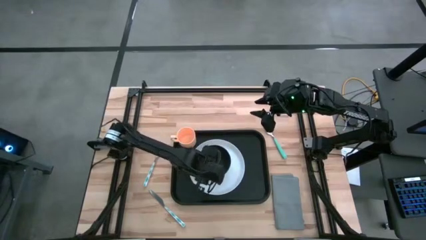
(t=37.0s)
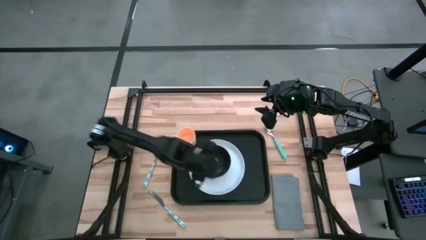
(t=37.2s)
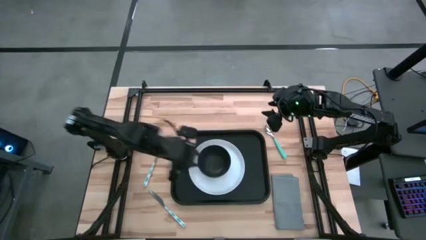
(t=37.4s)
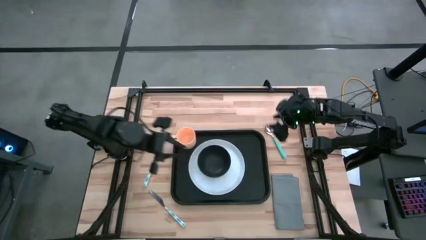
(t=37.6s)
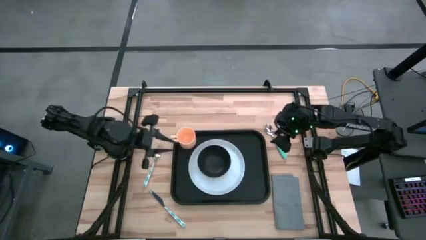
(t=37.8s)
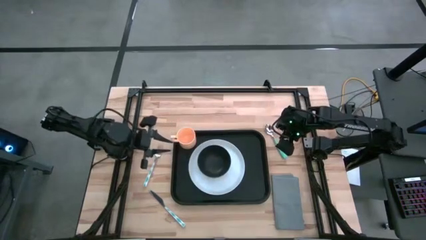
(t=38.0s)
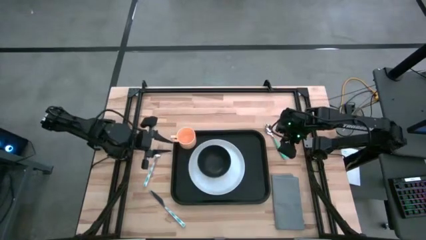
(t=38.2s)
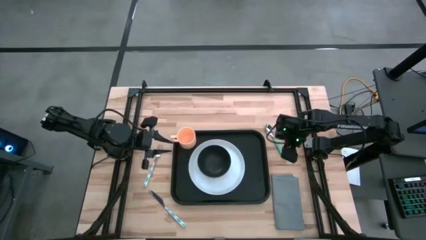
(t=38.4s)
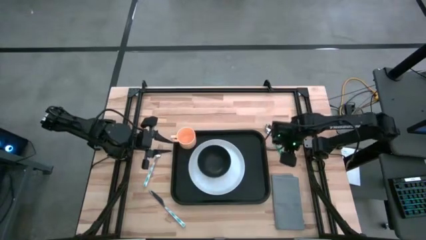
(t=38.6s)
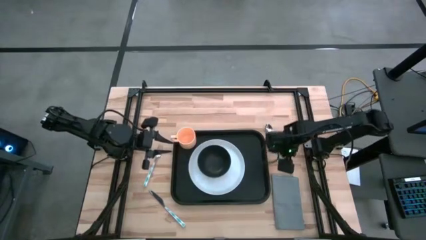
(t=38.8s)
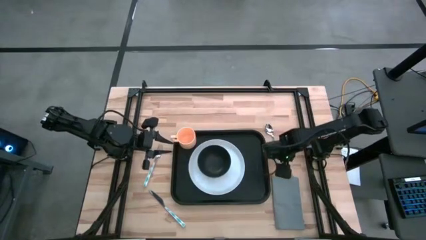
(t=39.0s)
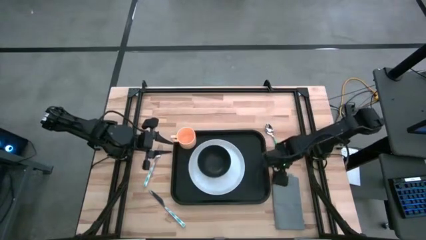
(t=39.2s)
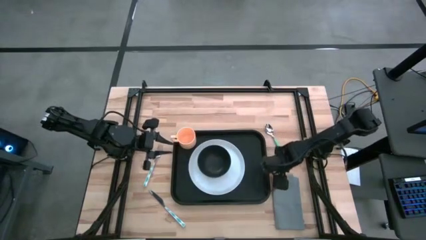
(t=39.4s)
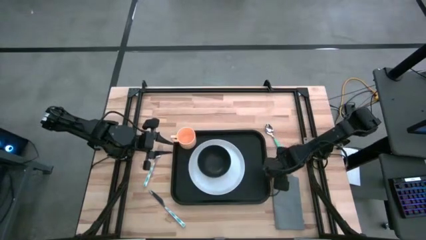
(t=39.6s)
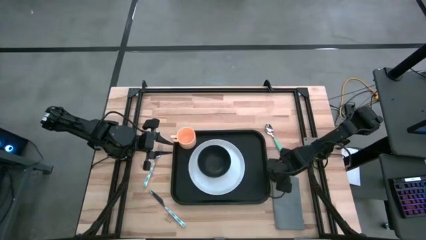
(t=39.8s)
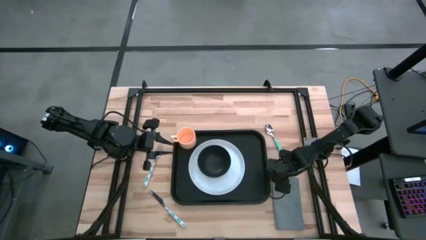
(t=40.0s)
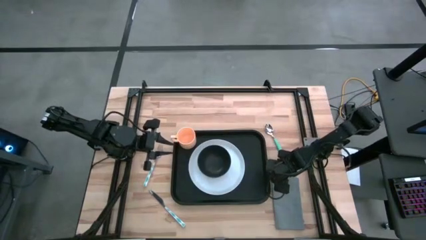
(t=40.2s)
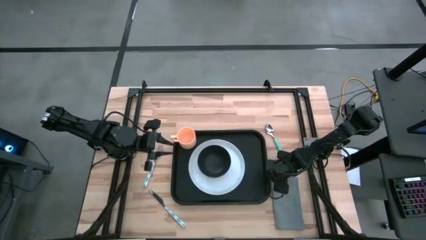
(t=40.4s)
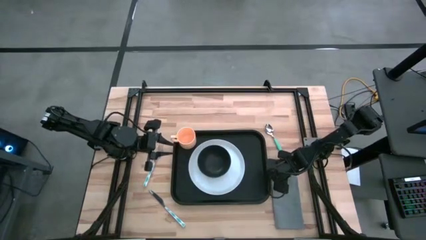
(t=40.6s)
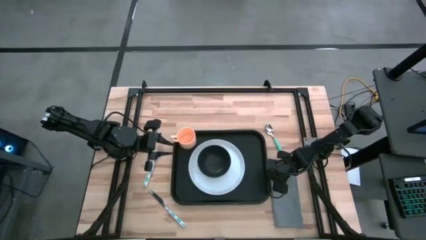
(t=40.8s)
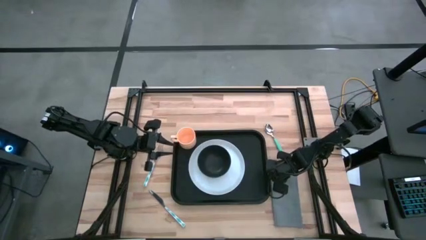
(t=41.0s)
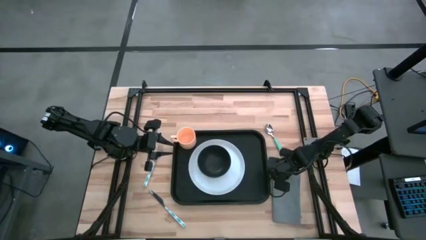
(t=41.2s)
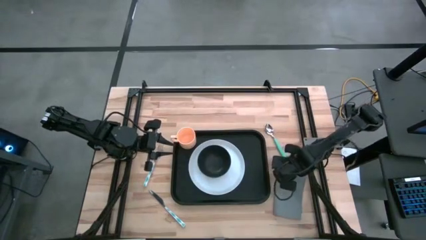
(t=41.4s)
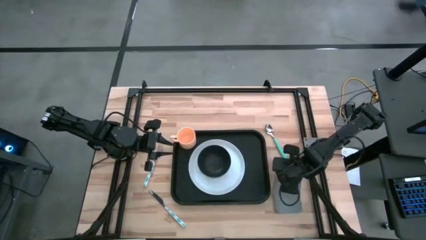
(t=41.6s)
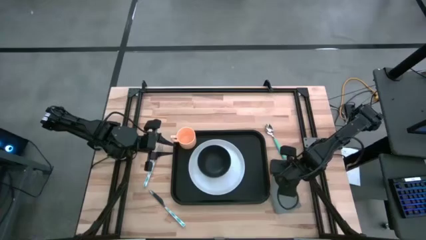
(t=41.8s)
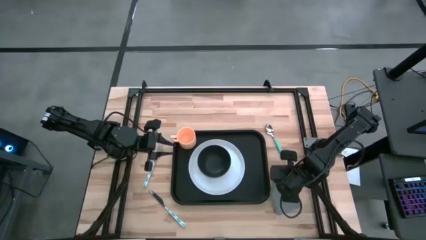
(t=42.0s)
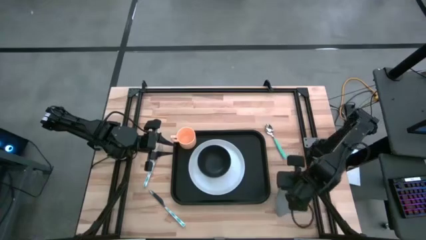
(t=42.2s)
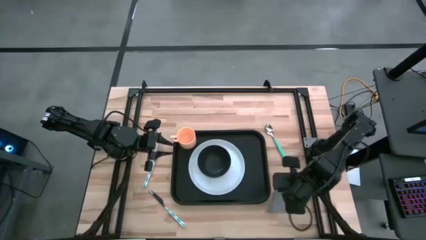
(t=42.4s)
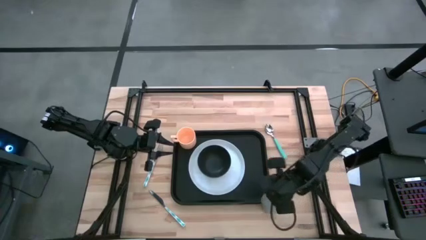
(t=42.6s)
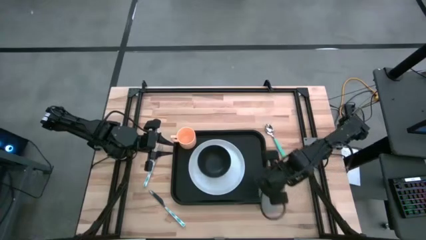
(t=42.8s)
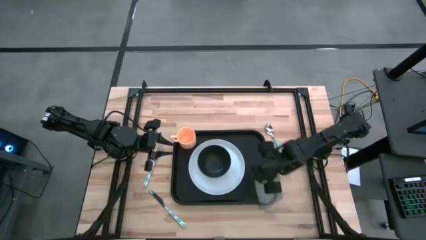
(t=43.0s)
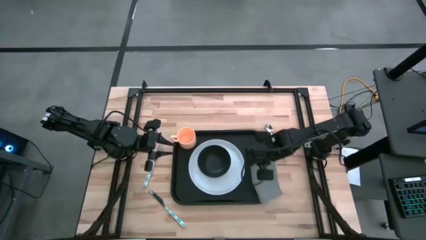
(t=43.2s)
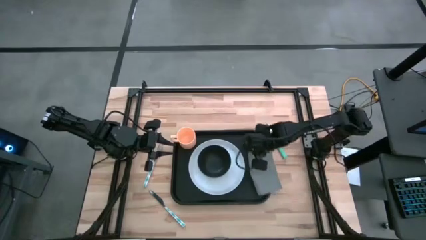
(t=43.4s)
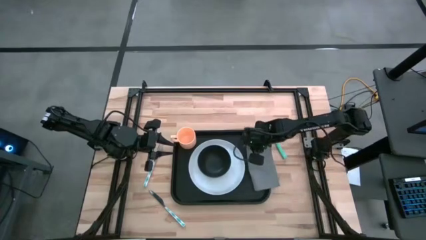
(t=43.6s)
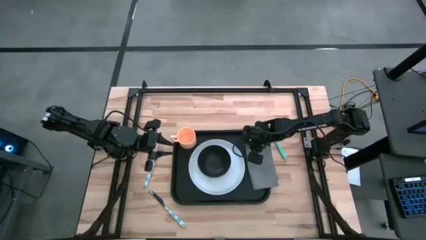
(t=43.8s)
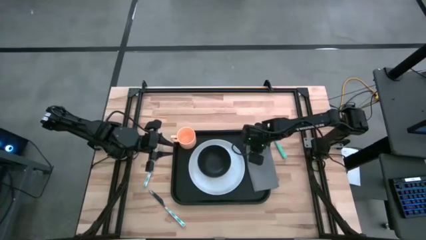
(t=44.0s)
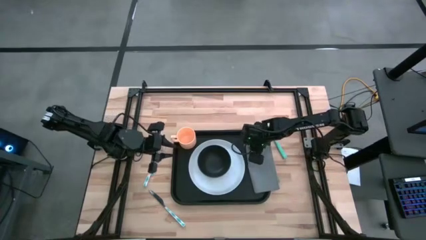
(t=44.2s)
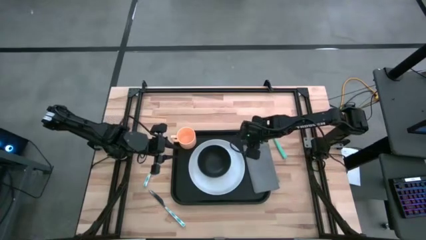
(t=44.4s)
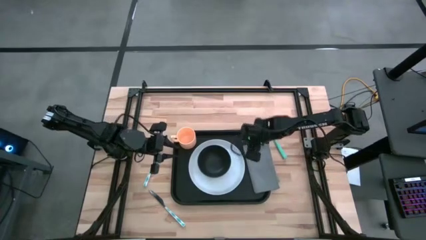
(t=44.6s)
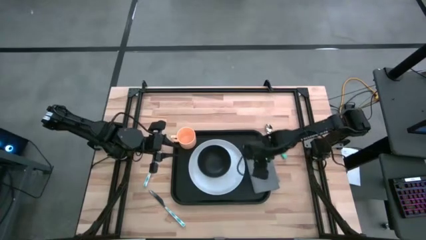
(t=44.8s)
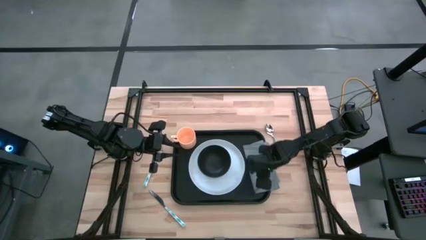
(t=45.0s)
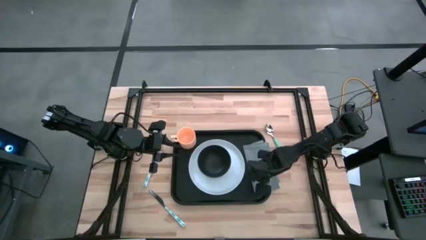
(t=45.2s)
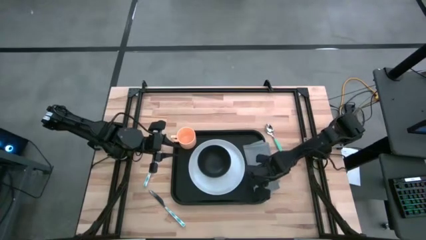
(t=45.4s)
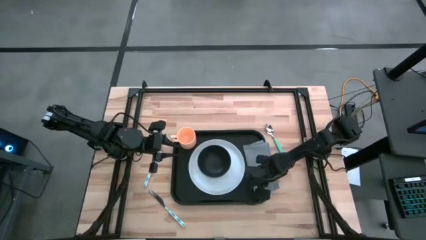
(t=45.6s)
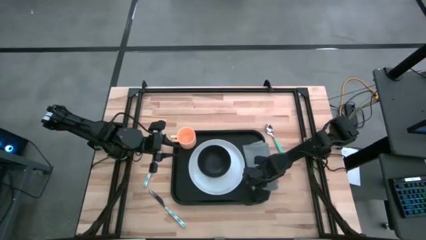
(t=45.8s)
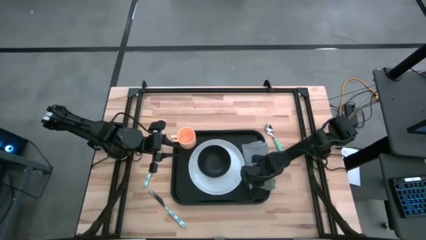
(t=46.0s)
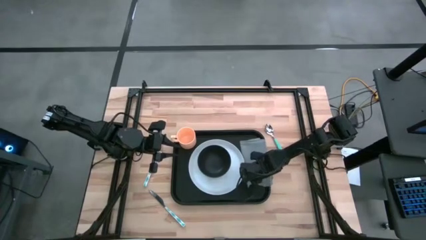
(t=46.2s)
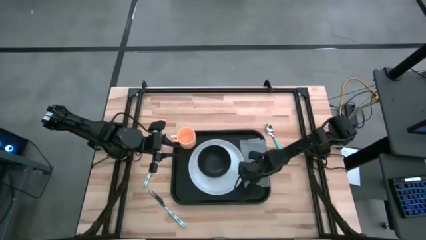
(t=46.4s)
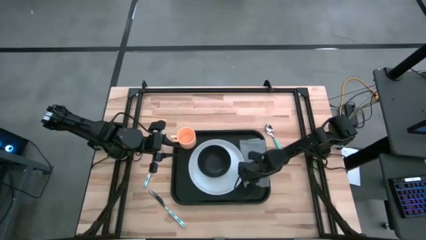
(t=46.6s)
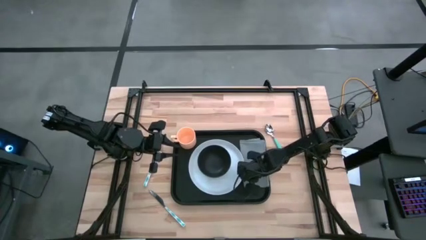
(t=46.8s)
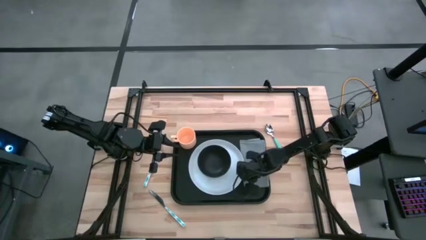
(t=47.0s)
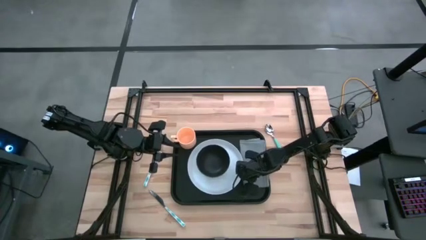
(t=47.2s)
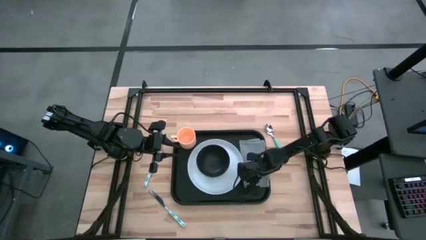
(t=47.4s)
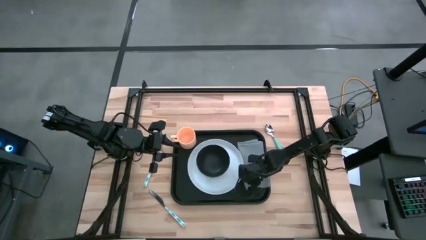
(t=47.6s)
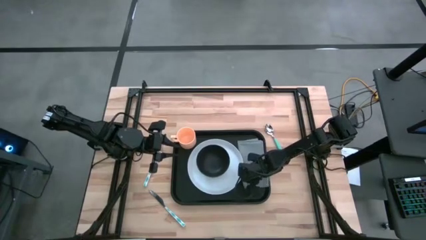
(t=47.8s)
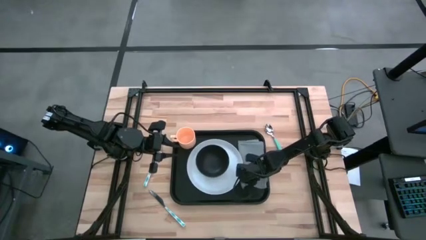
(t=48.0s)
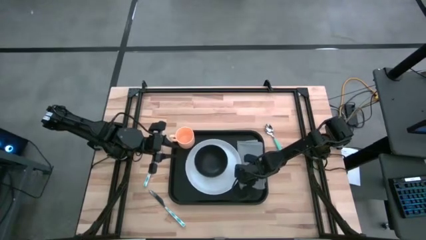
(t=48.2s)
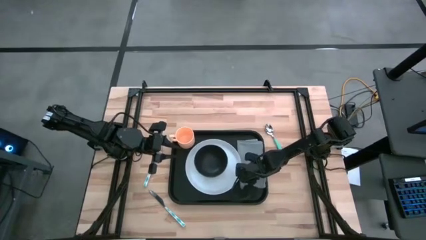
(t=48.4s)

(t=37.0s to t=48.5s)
Task: Set up tray
Put the blue patterned fork on the gray napkin
